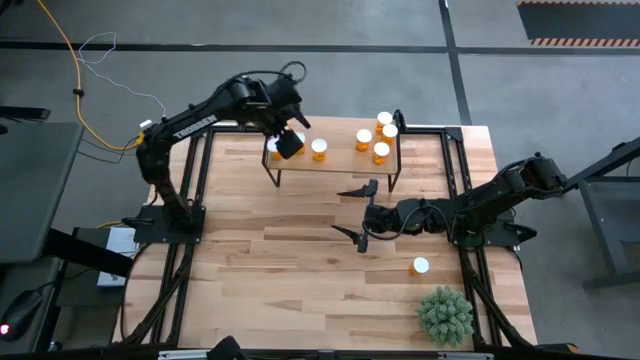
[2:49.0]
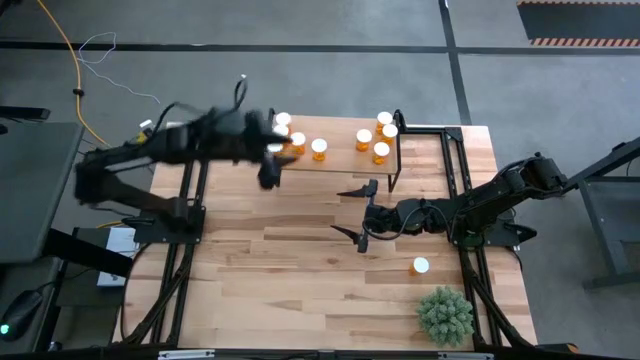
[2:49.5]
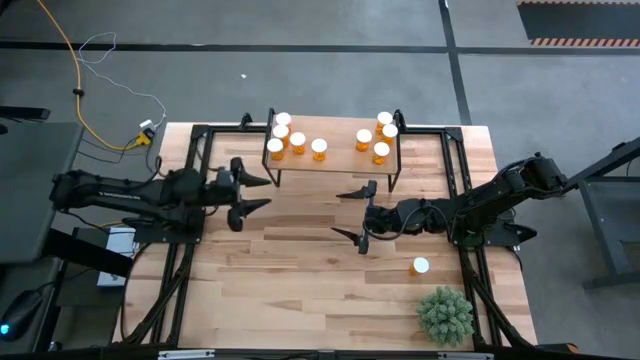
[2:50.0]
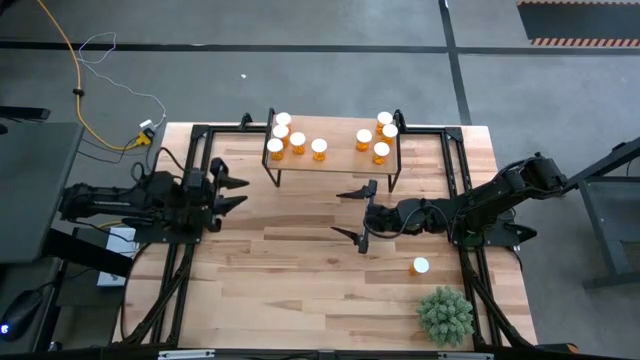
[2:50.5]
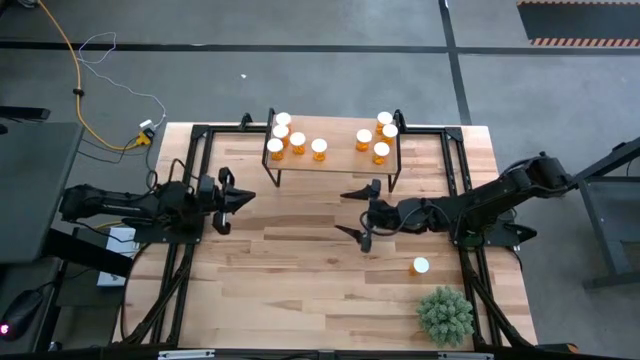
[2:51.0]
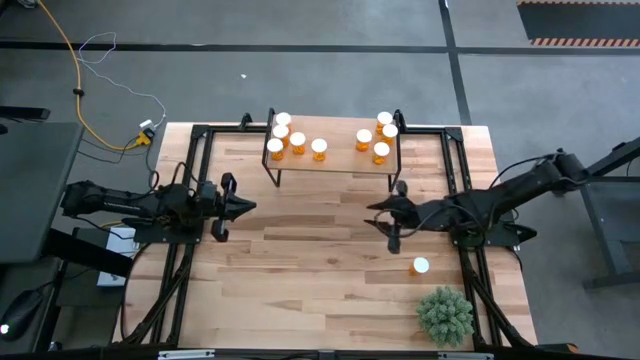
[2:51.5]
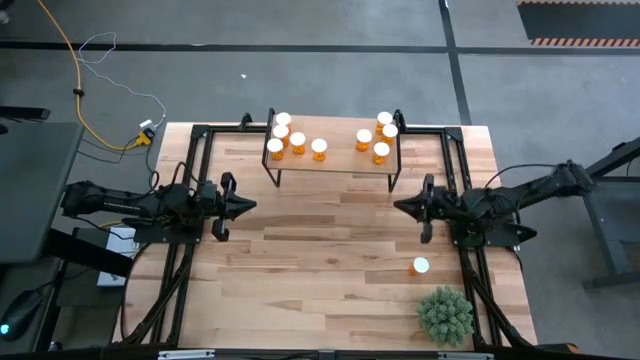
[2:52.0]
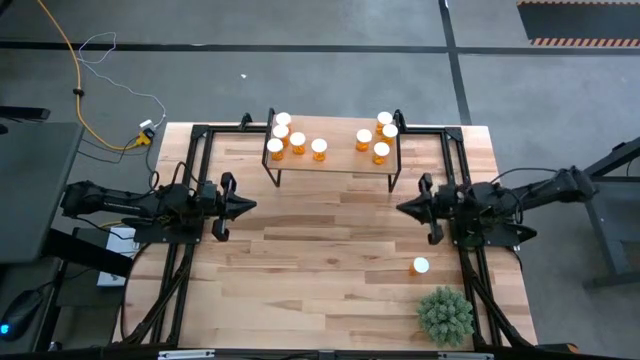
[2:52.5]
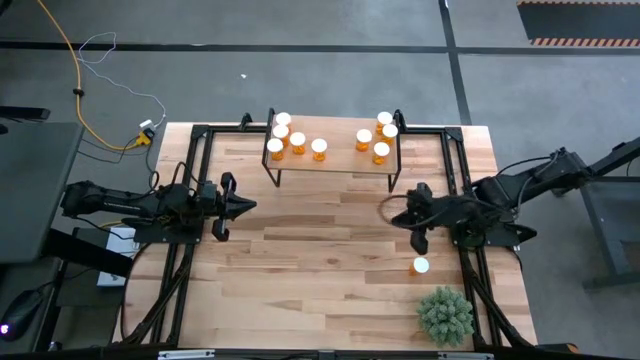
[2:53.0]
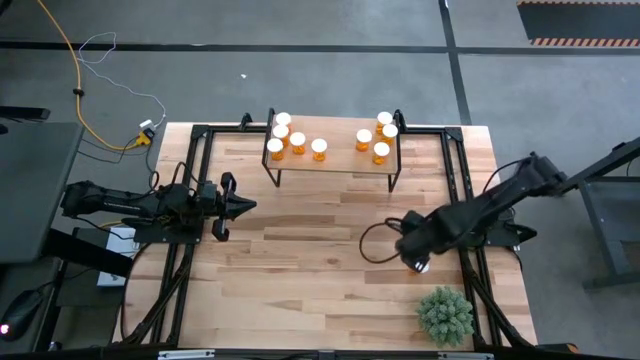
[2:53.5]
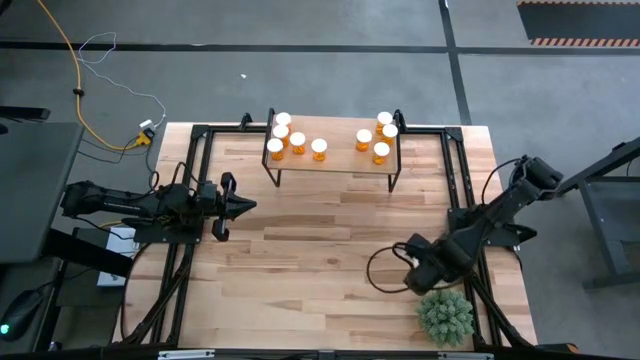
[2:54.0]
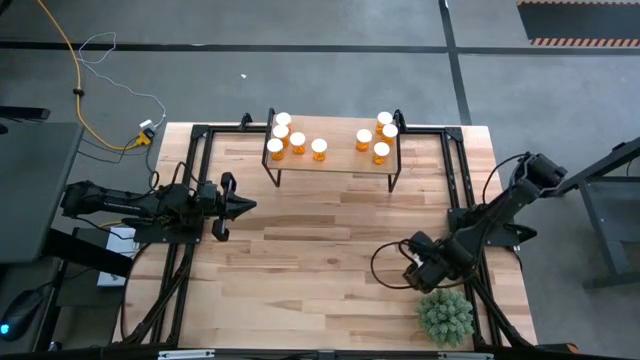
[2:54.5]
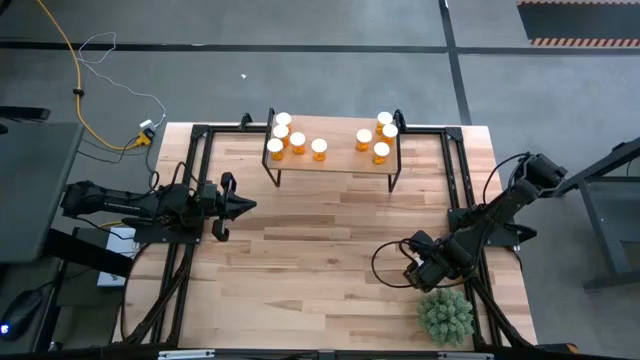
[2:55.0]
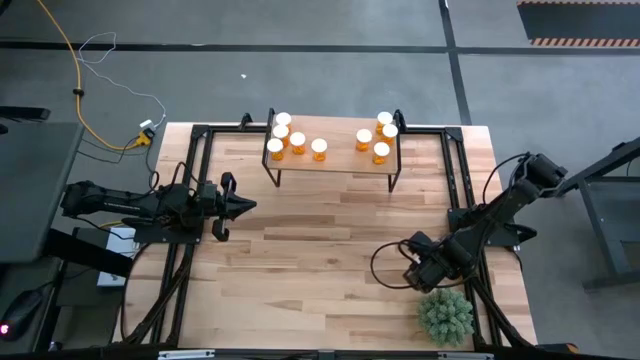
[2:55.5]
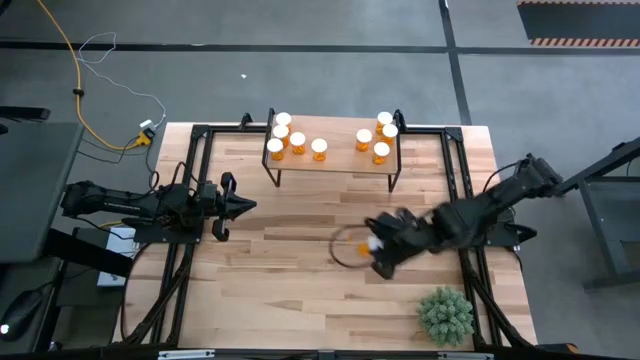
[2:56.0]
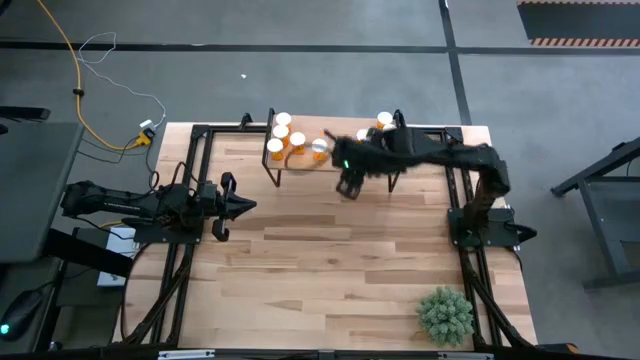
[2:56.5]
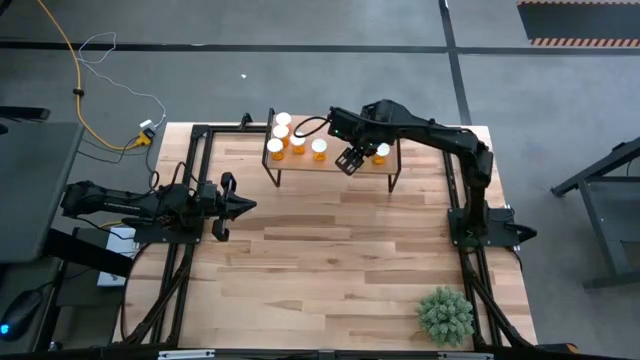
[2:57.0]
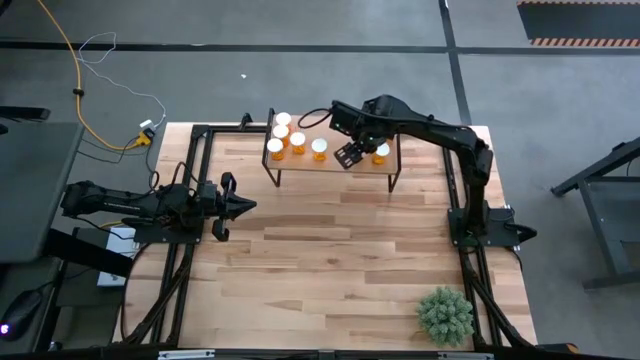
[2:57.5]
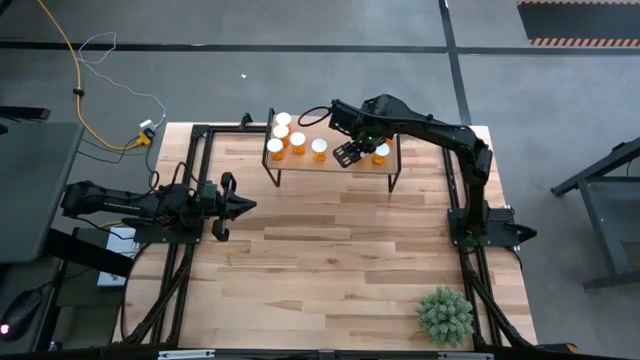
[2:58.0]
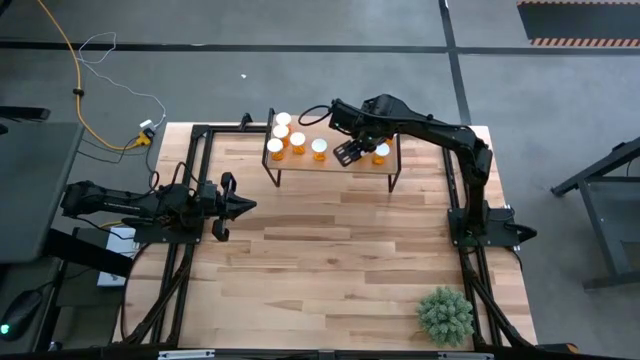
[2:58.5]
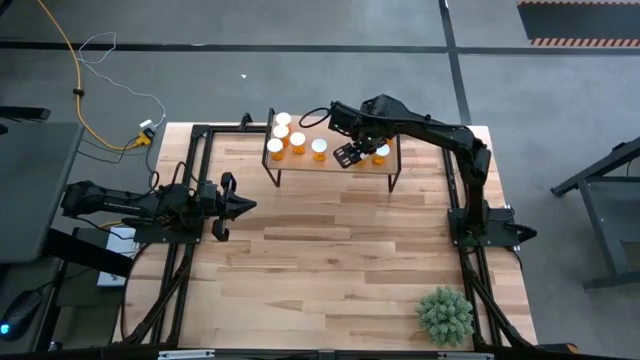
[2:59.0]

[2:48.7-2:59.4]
Task: Pick and place medicine bottles onto shelf by color
Put the yellow pill bottle on the shelf

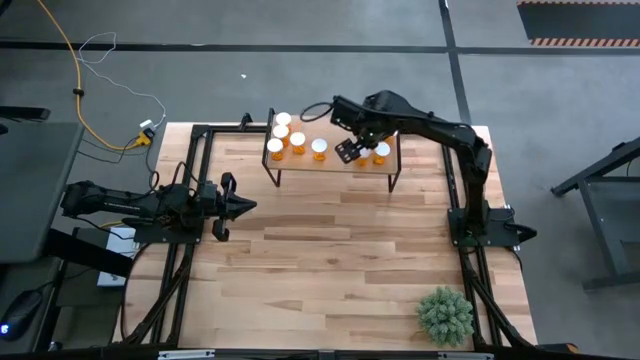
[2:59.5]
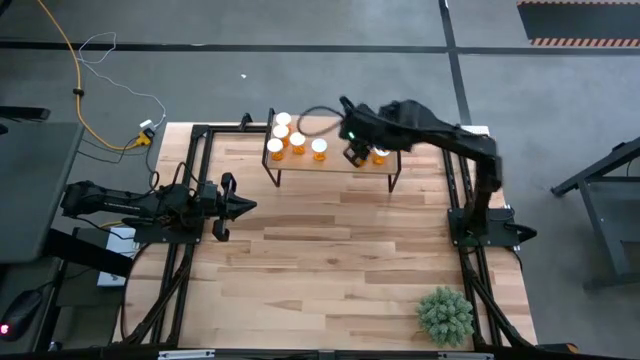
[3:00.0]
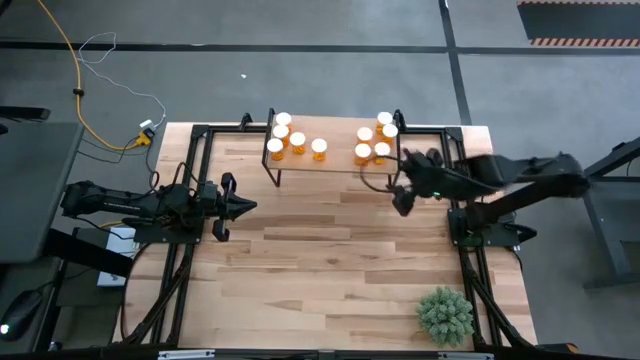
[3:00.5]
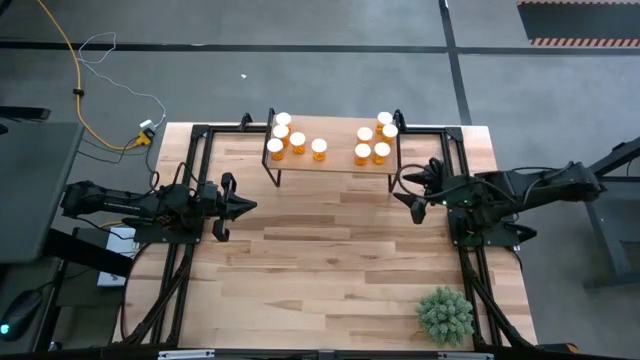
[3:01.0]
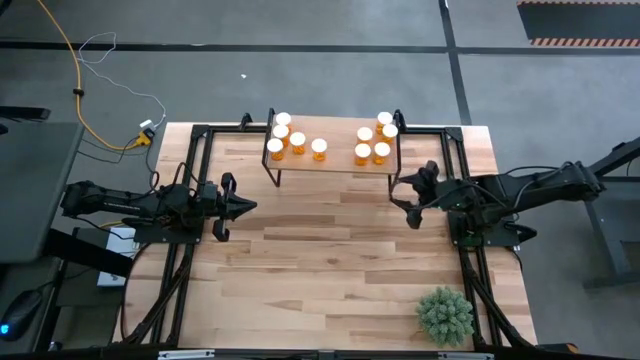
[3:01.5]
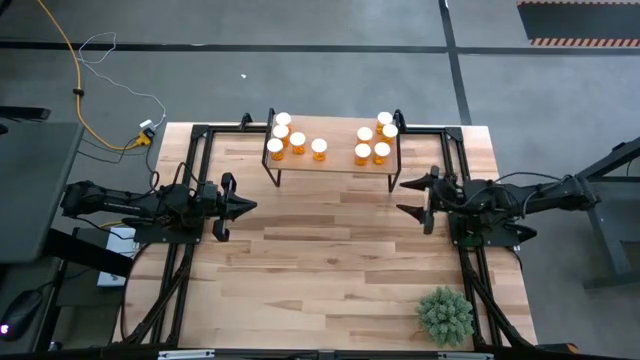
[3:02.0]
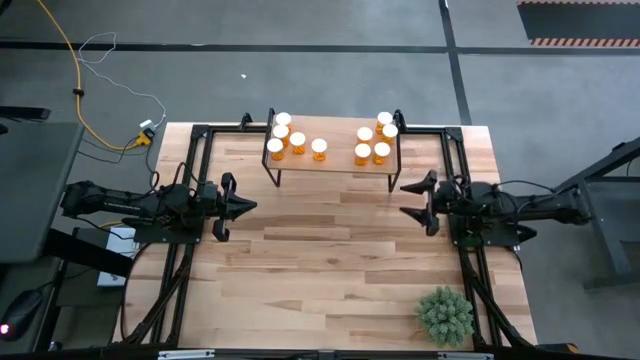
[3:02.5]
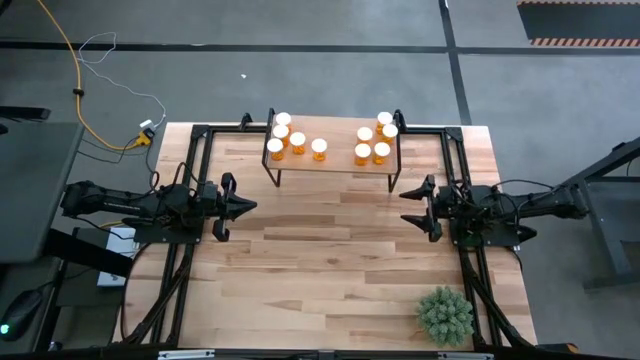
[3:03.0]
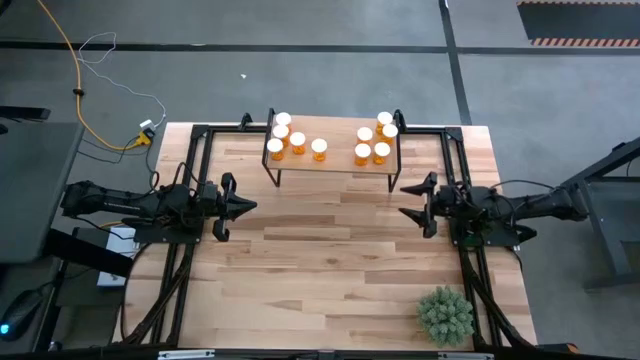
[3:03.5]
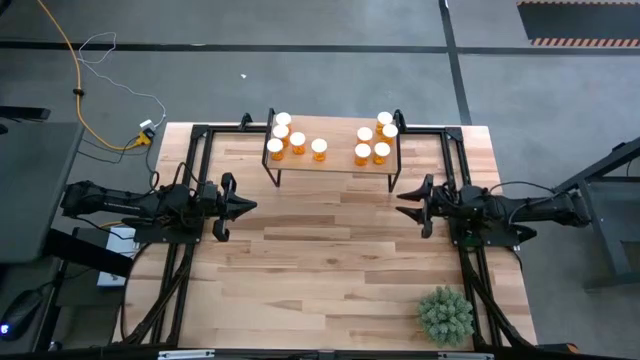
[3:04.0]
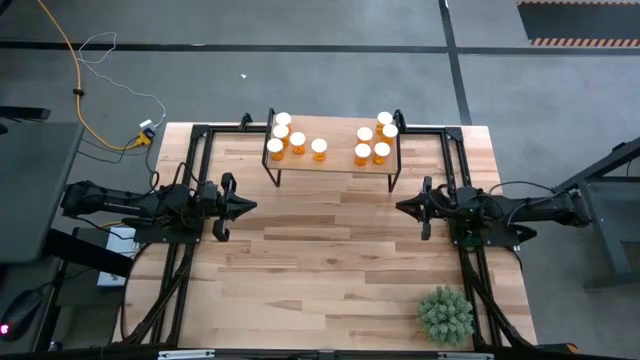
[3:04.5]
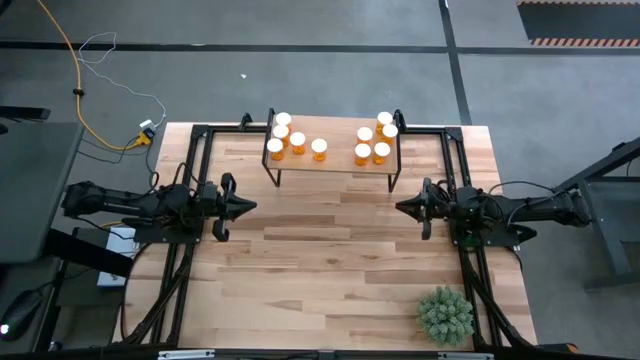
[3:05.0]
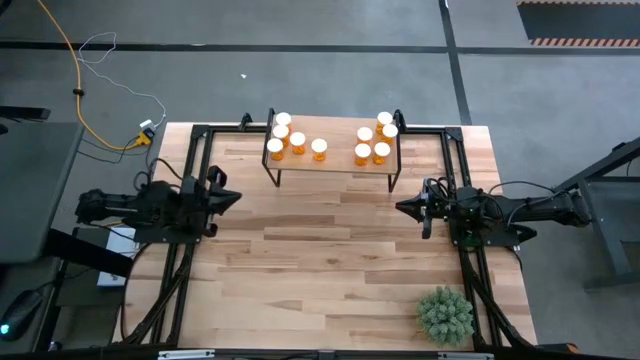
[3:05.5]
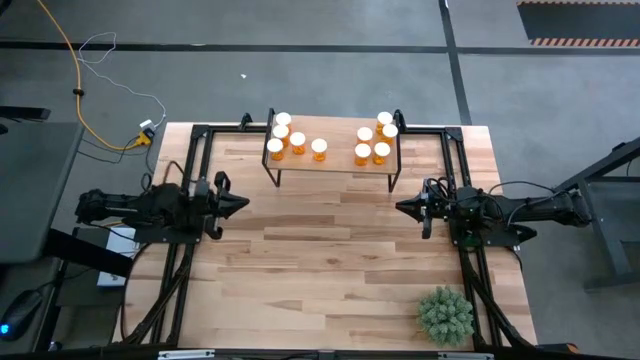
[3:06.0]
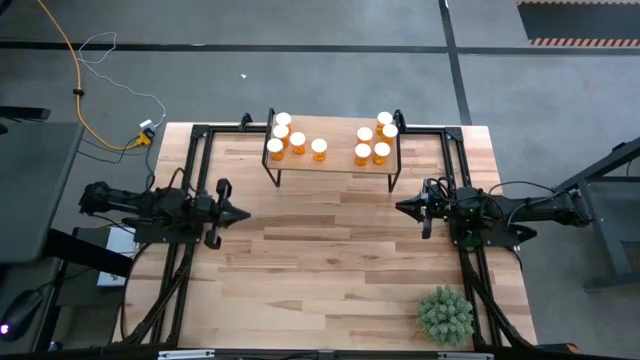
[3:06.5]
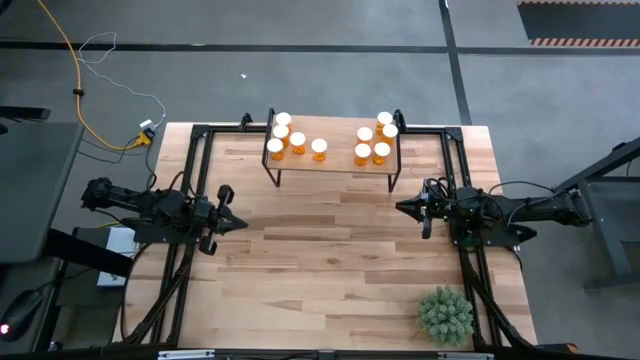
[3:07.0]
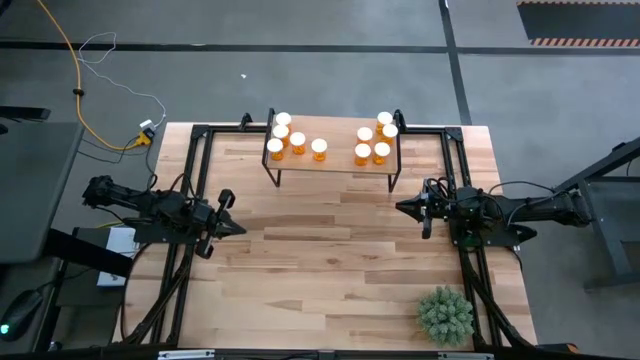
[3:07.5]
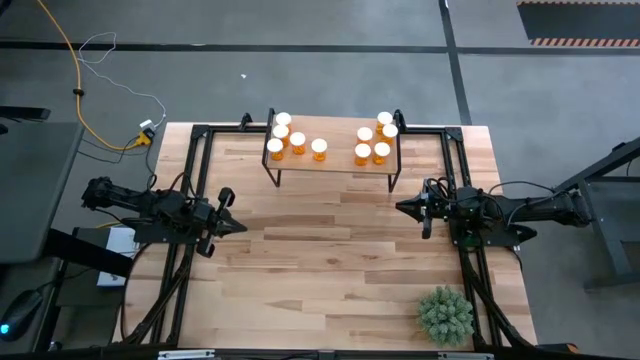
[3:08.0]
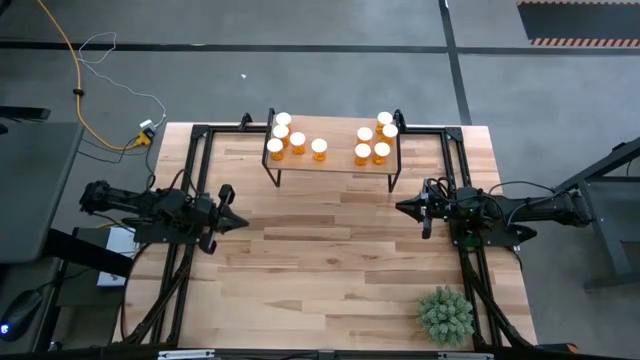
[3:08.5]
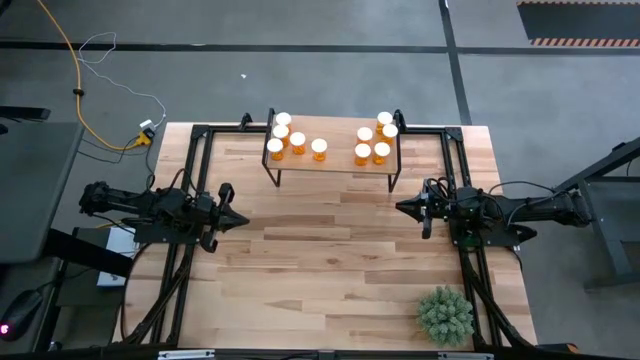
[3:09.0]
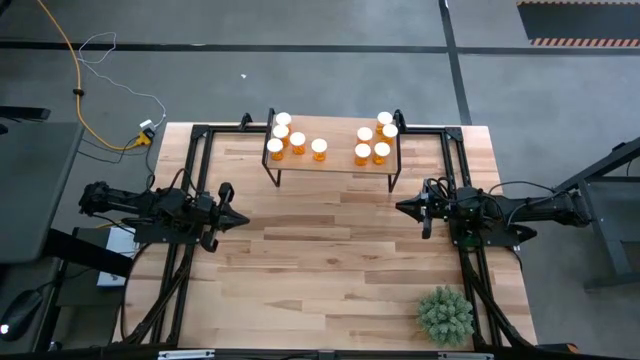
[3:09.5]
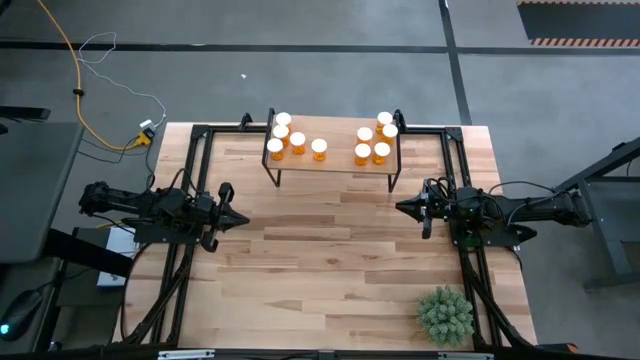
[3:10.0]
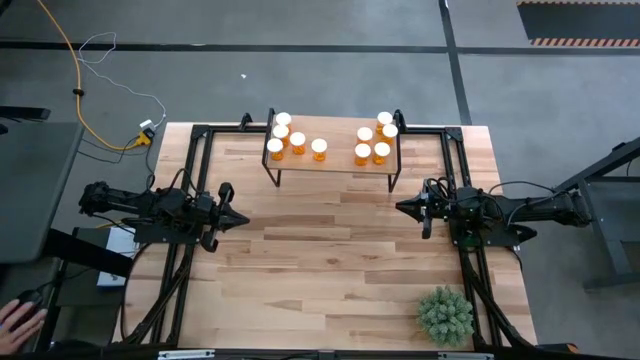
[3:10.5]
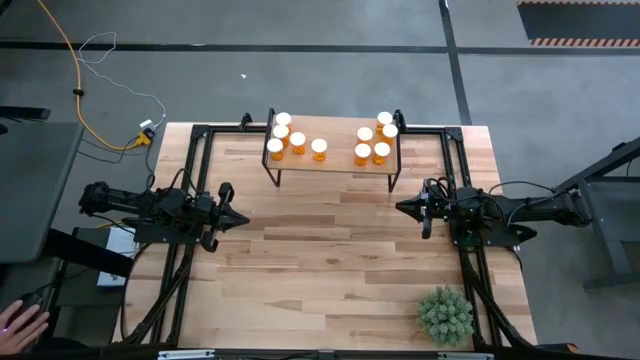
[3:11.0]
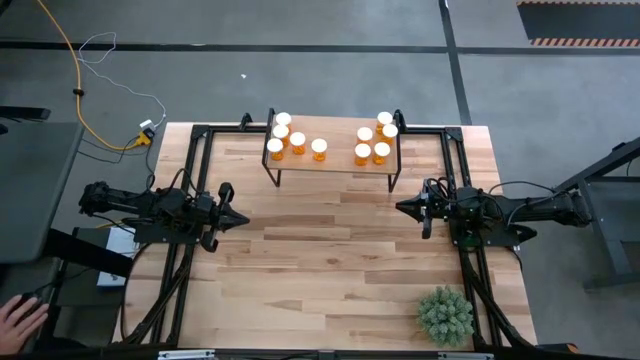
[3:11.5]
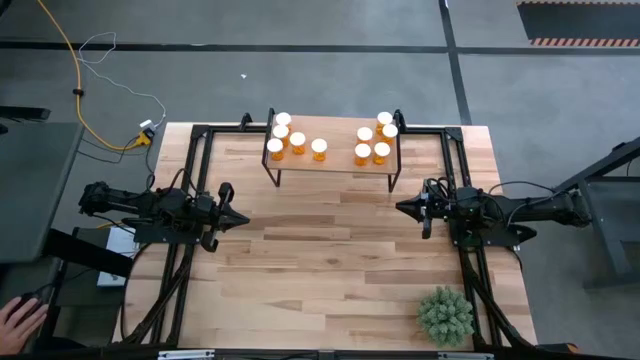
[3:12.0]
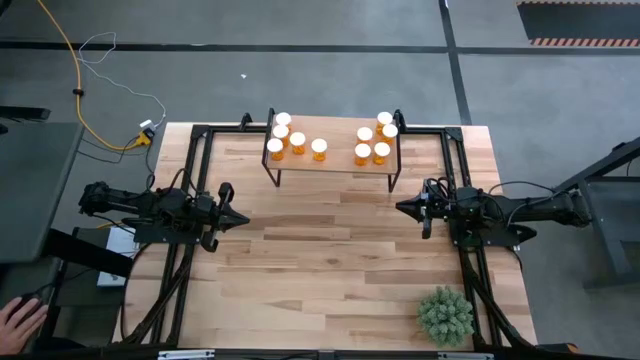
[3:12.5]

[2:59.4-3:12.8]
Return to Home Position
